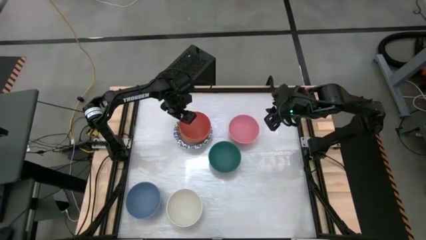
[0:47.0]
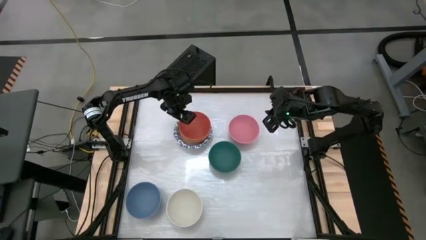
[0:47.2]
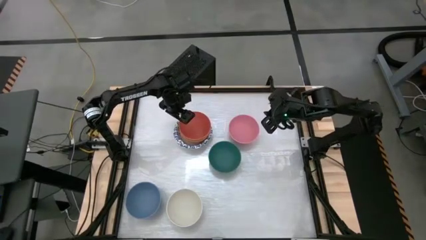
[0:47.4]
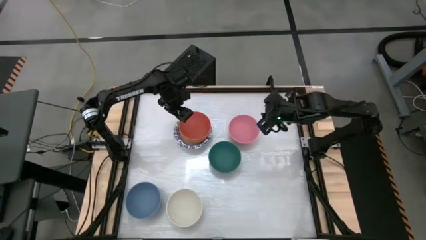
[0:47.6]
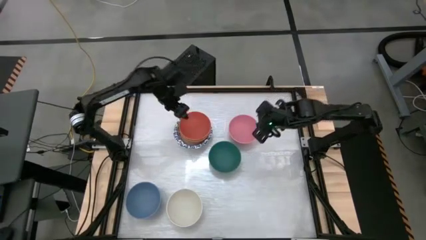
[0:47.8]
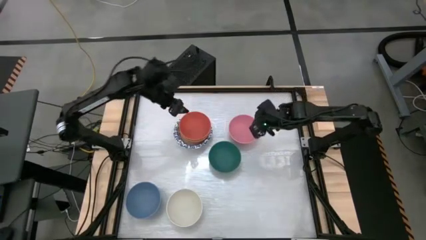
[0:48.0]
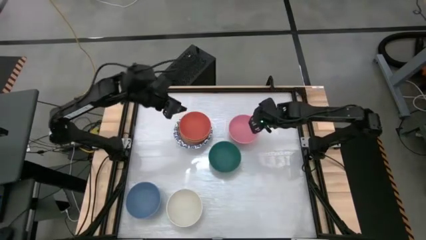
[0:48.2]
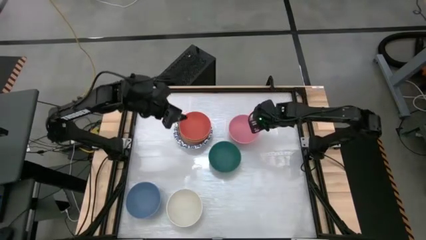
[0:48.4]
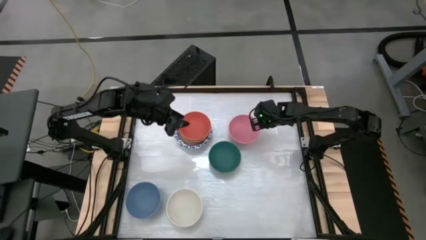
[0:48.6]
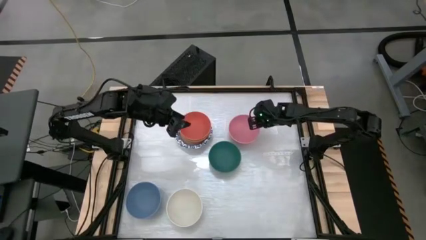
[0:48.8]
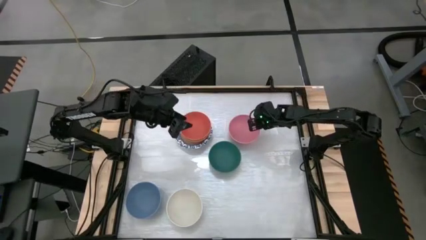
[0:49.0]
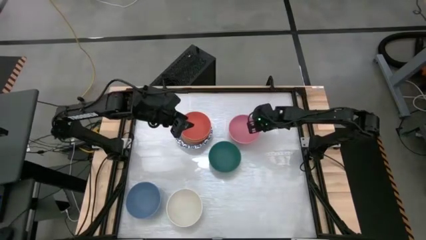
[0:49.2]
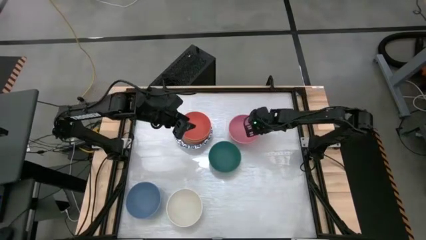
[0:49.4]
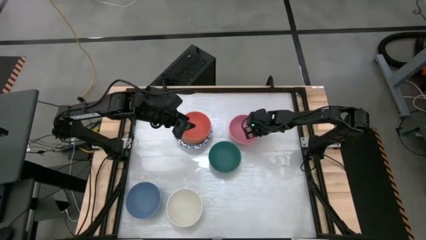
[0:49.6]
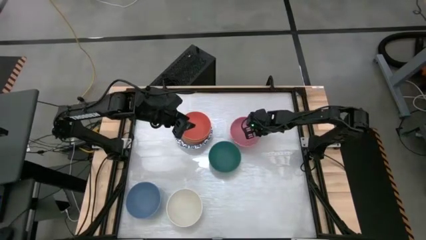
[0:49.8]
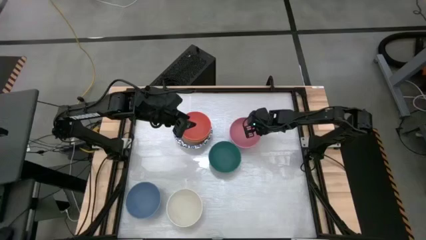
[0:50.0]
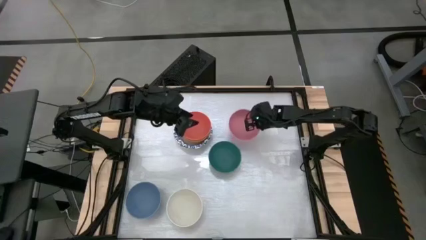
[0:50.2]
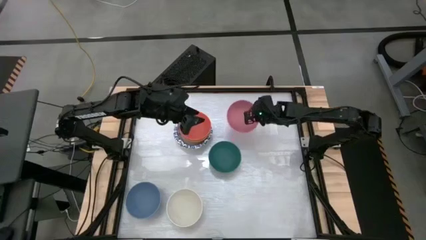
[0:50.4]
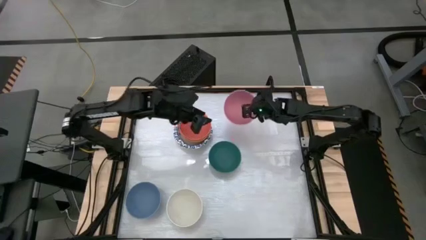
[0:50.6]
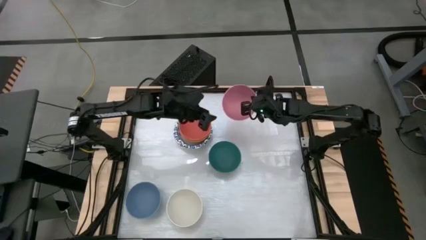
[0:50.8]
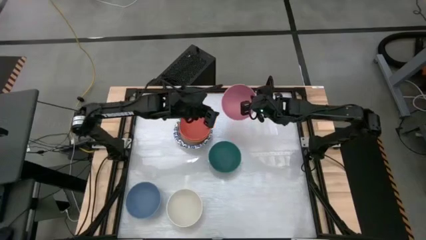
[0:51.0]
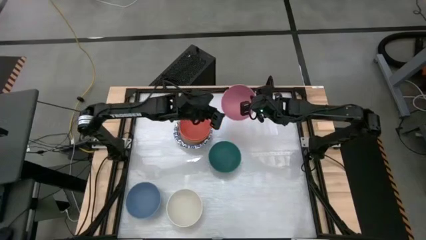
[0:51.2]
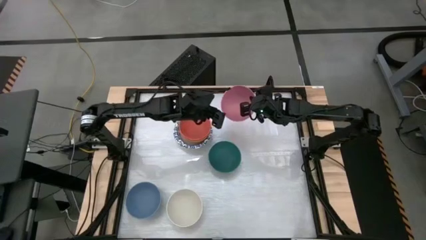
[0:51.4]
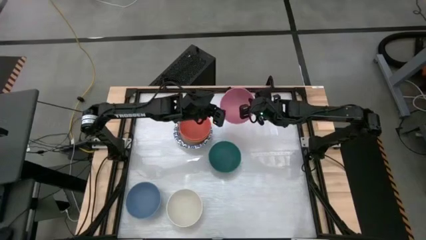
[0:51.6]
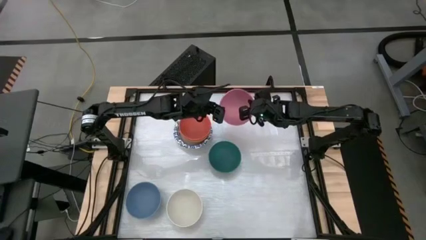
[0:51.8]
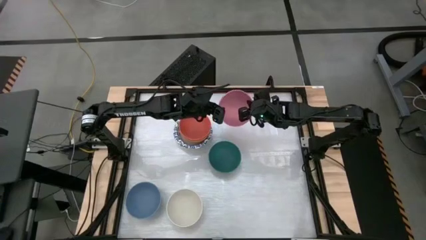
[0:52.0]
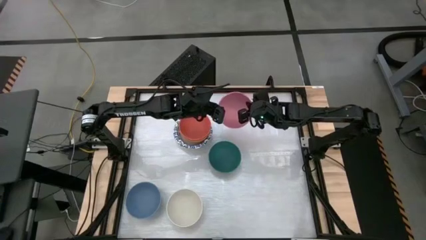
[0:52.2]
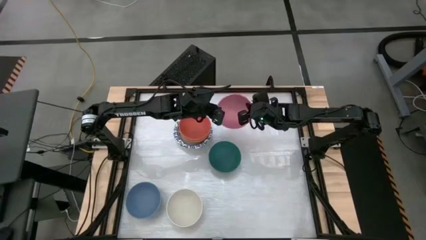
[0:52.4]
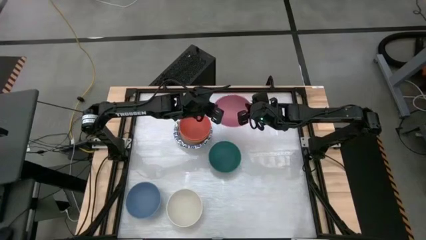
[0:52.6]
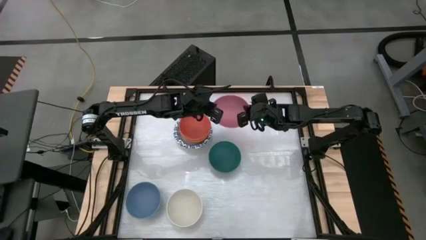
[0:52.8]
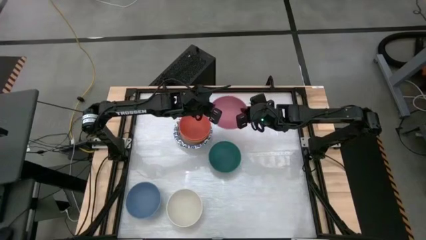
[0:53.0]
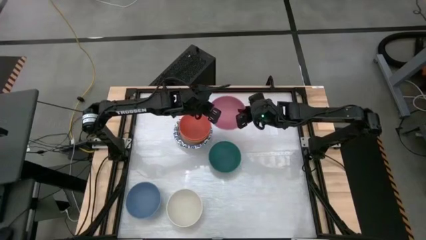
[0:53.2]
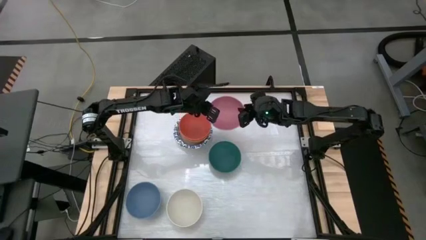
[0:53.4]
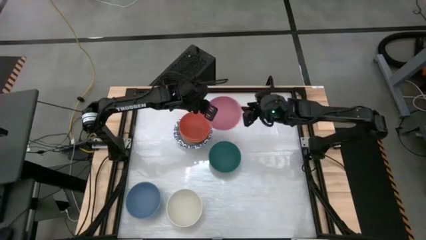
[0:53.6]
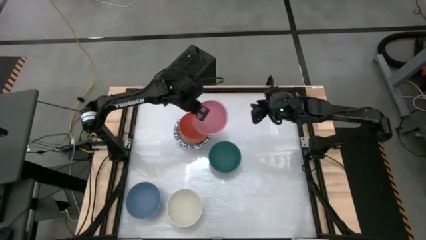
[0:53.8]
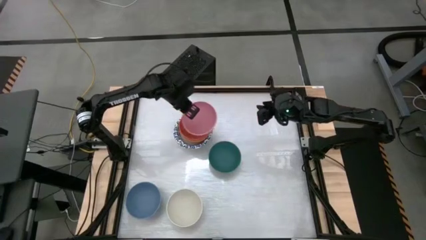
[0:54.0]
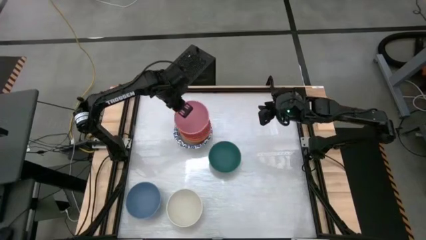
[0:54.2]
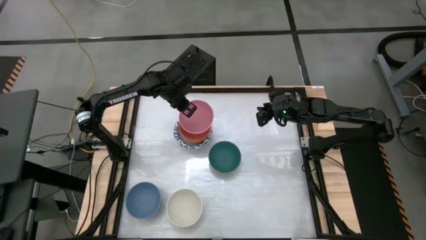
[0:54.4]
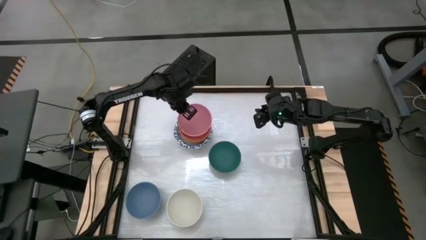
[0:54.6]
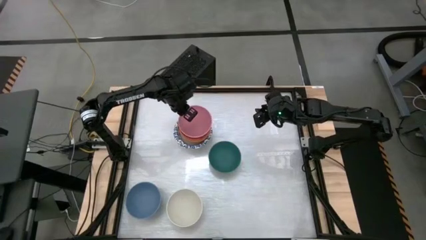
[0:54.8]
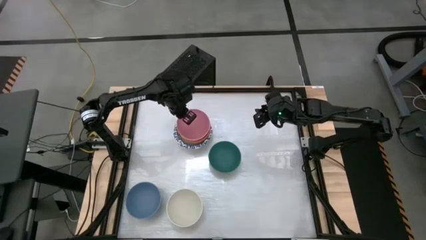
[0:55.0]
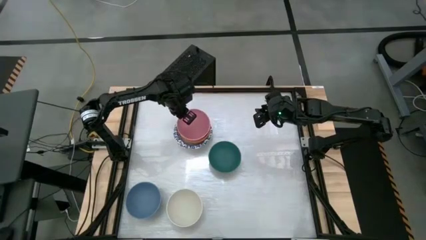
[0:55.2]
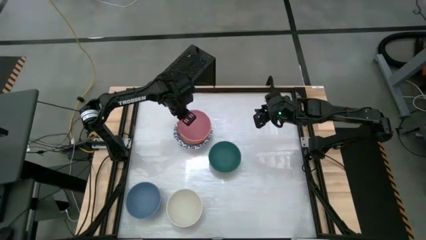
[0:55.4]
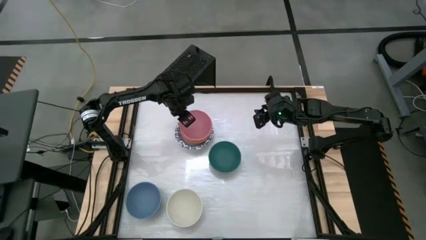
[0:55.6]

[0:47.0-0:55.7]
Stack the pink bowl on top of the orange bowl

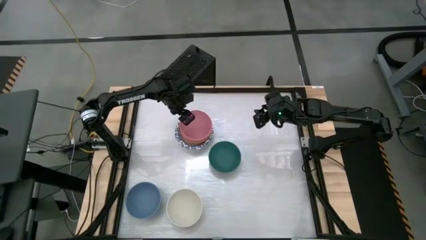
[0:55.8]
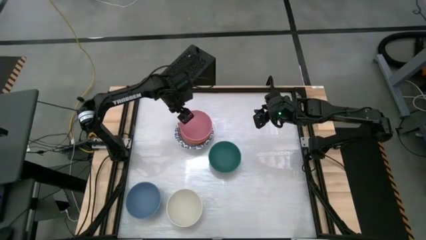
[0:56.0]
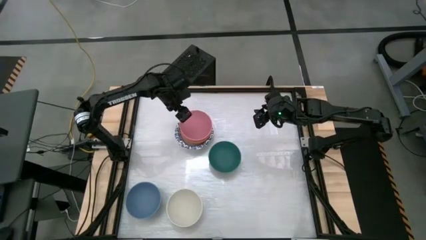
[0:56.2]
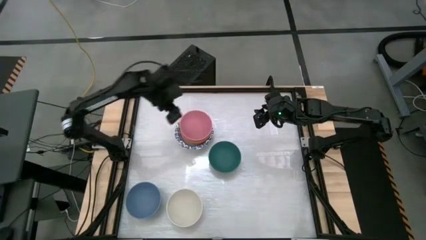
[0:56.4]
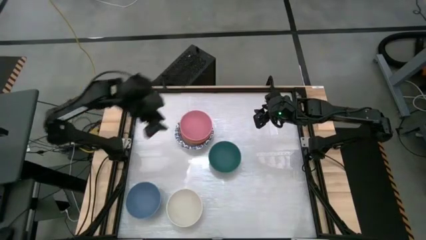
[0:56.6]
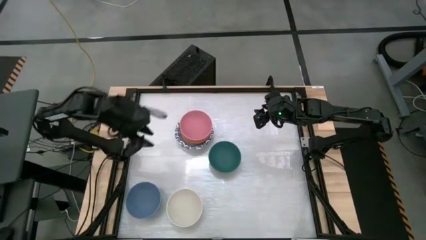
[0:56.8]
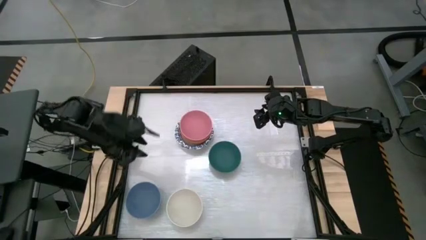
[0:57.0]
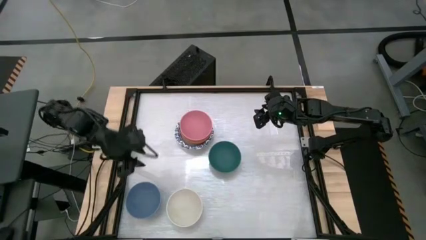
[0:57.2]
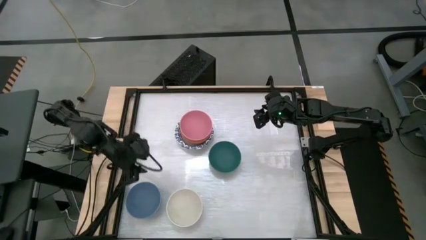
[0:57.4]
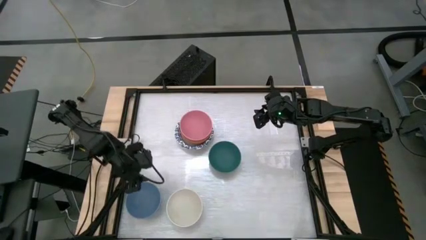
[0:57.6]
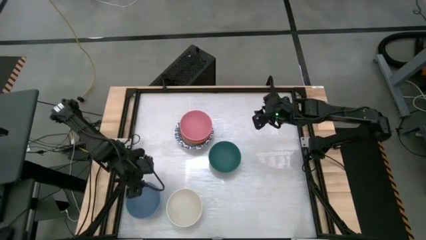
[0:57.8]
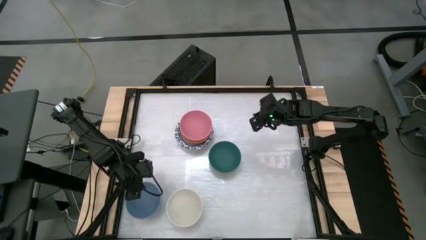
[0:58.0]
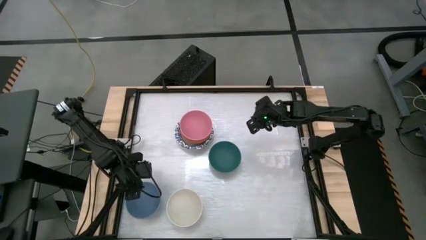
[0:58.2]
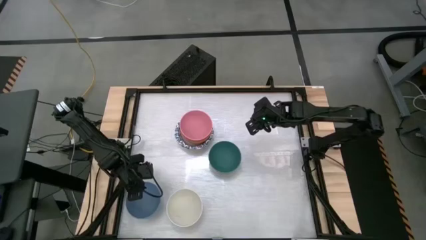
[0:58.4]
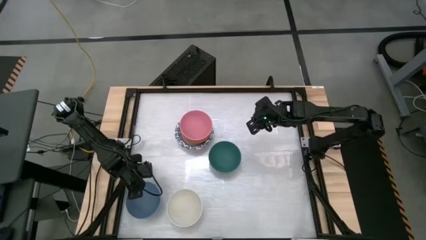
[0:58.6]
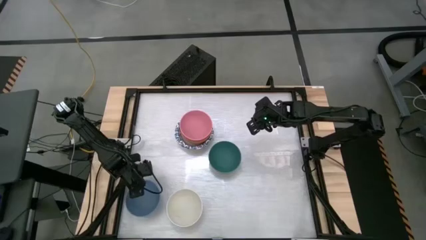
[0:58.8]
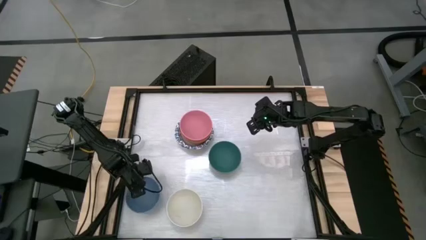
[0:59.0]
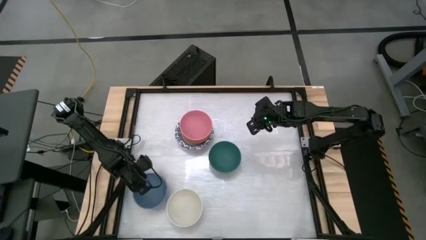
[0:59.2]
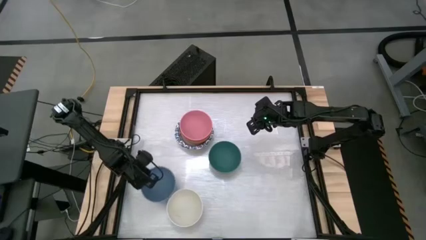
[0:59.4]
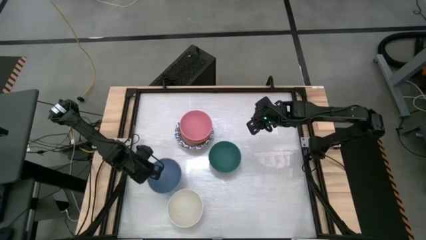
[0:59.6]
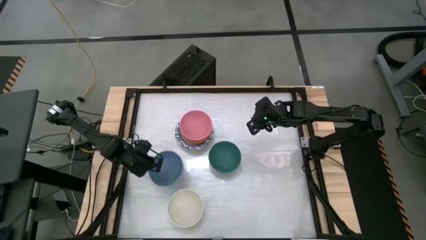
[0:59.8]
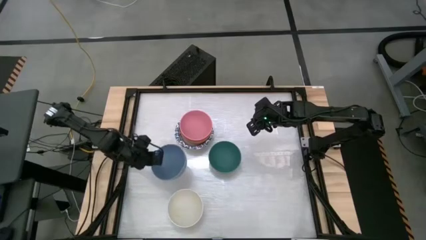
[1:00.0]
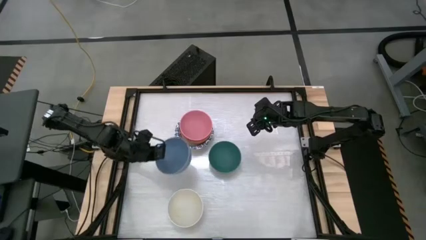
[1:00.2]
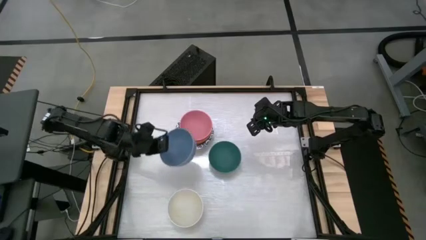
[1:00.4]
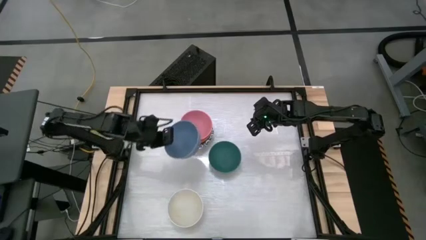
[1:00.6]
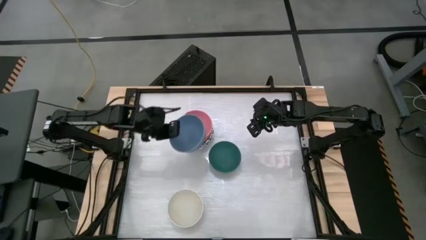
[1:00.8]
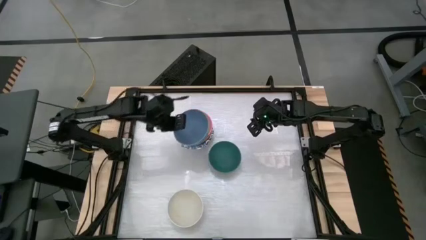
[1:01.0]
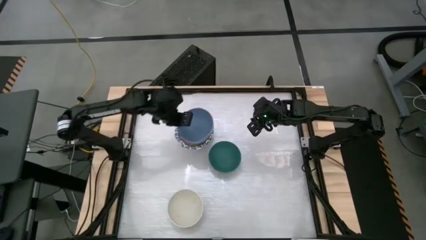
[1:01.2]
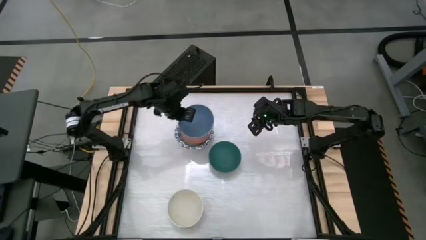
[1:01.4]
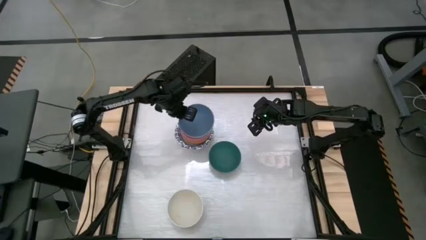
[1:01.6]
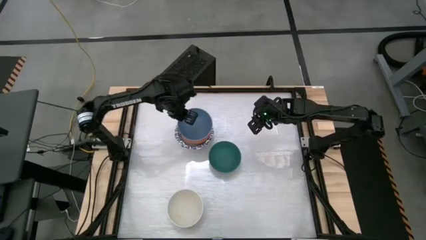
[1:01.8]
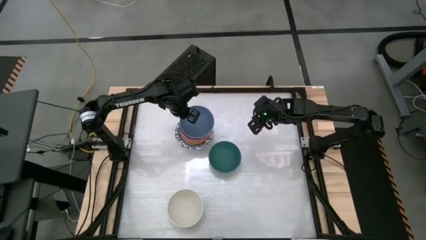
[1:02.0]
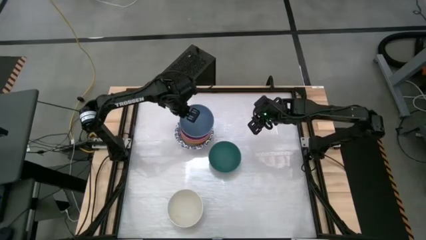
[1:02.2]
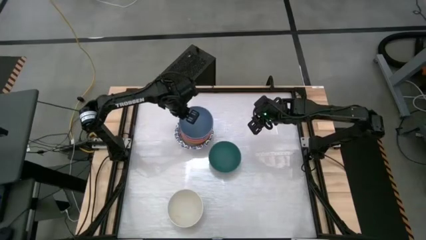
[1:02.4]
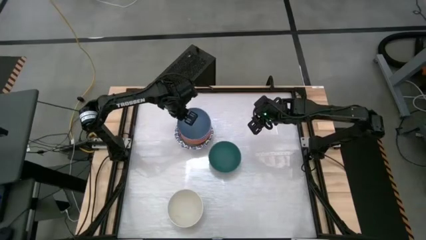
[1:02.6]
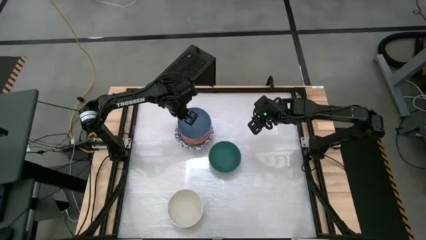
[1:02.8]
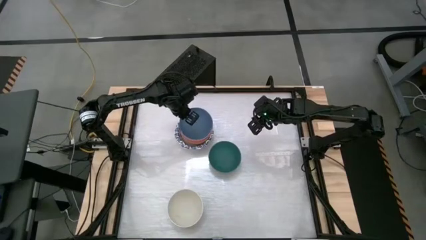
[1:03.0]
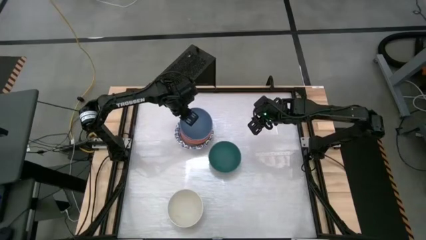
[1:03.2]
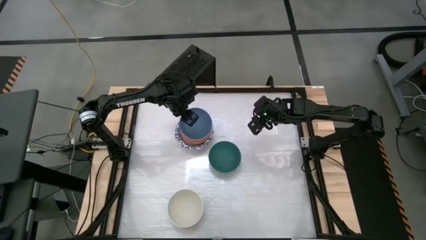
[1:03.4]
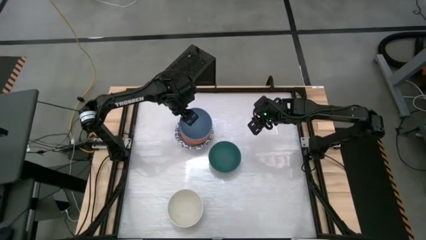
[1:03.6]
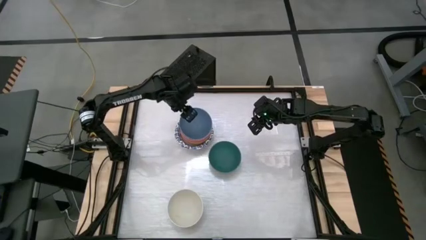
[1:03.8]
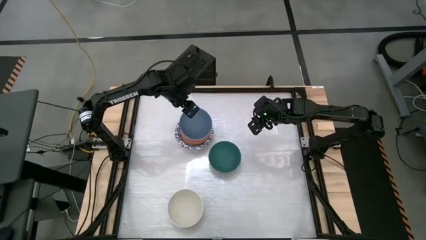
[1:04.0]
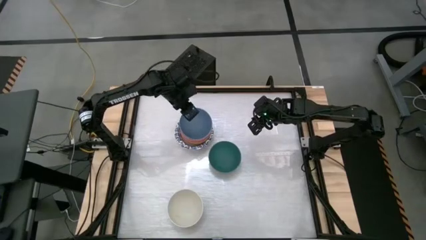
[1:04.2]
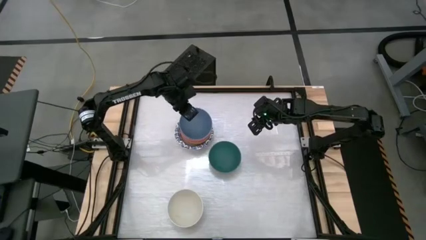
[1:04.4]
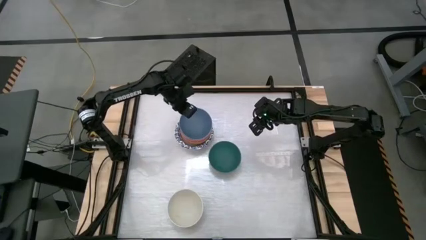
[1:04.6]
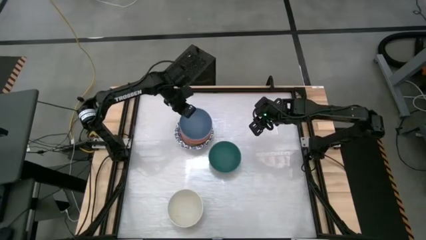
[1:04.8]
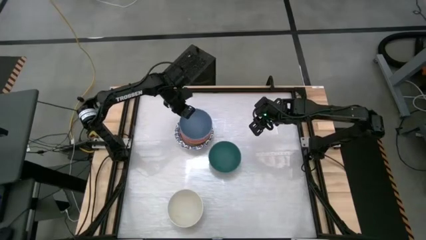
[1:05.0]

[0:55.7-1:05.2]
Stack the blue bowl on top of the pink bowl
